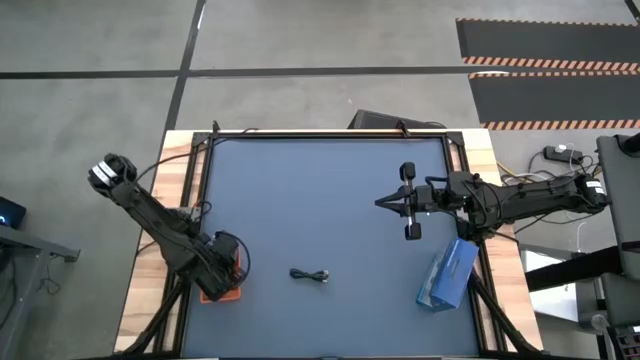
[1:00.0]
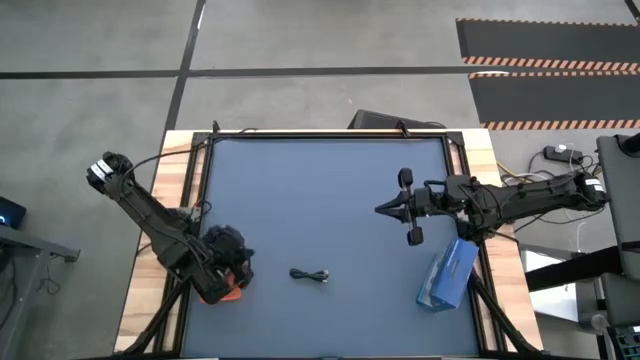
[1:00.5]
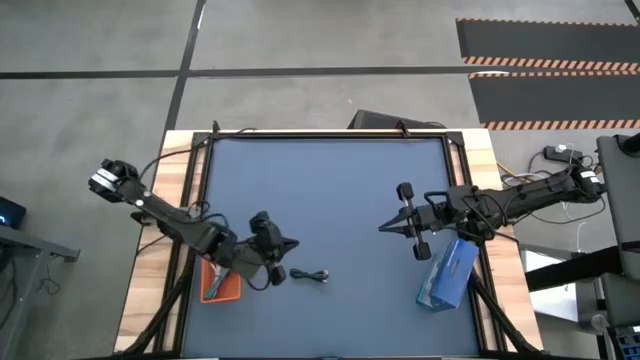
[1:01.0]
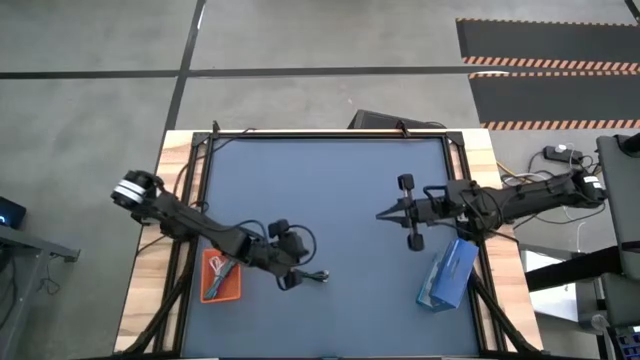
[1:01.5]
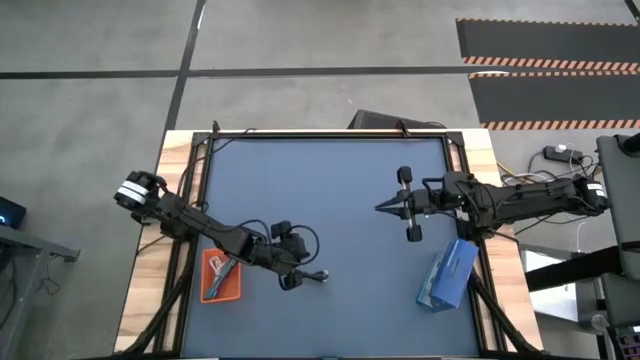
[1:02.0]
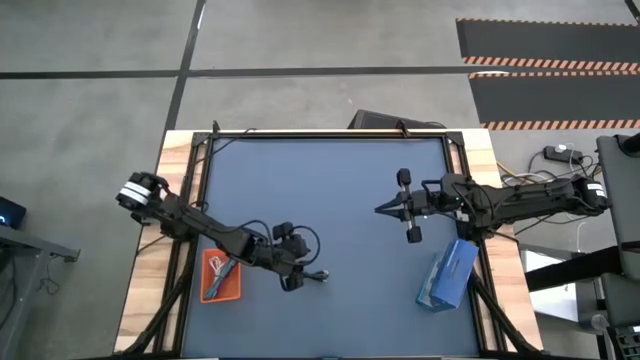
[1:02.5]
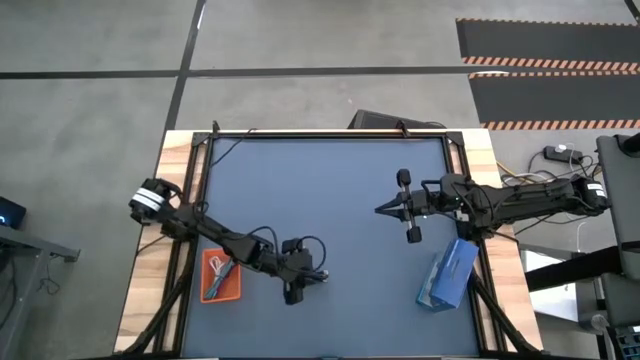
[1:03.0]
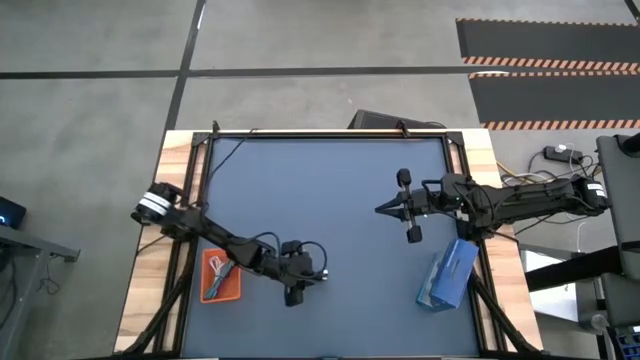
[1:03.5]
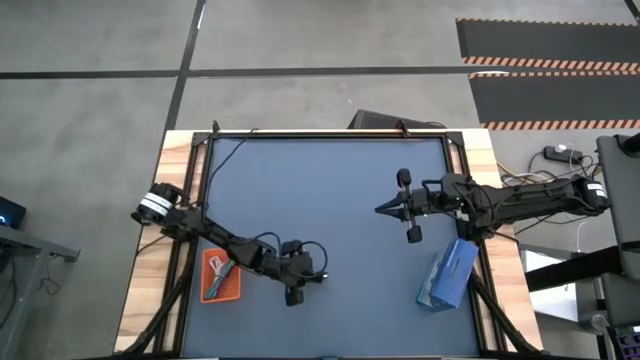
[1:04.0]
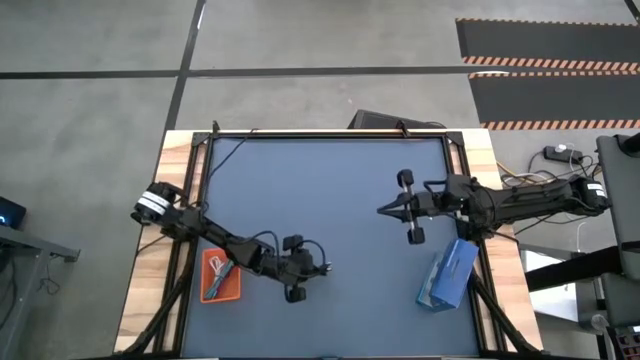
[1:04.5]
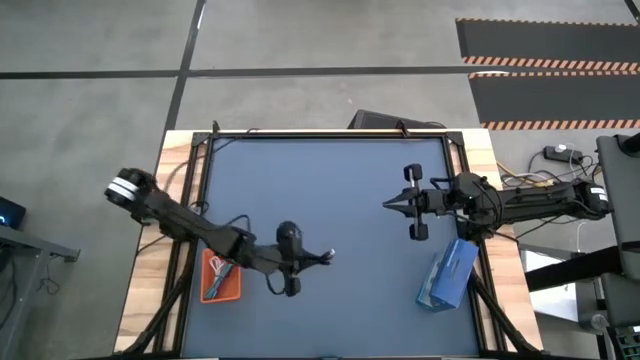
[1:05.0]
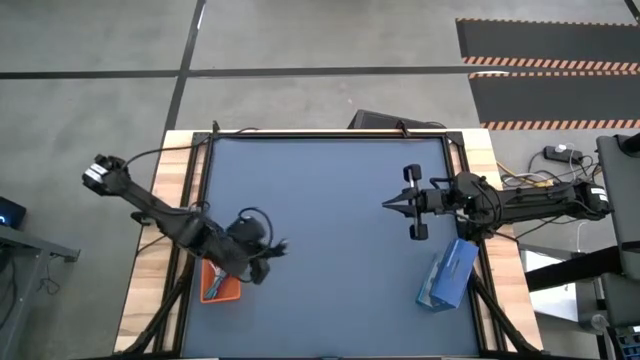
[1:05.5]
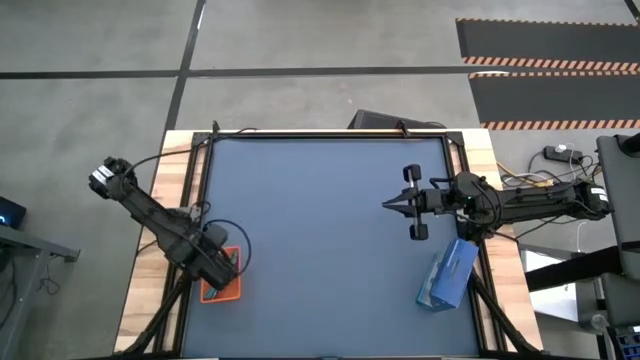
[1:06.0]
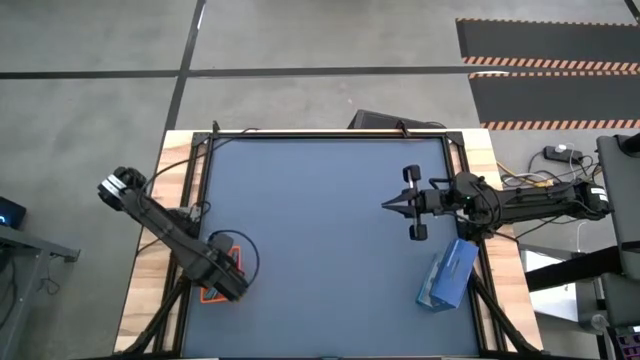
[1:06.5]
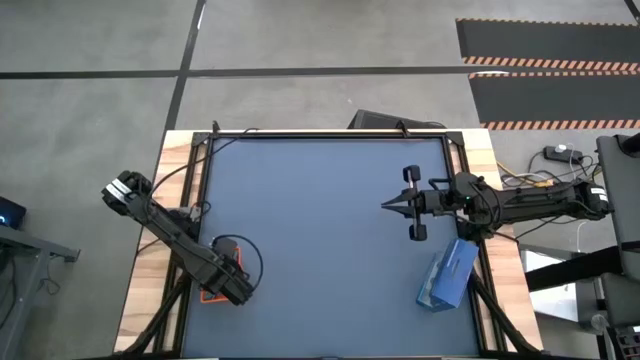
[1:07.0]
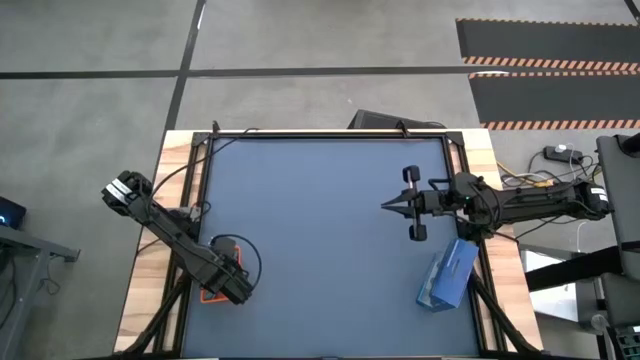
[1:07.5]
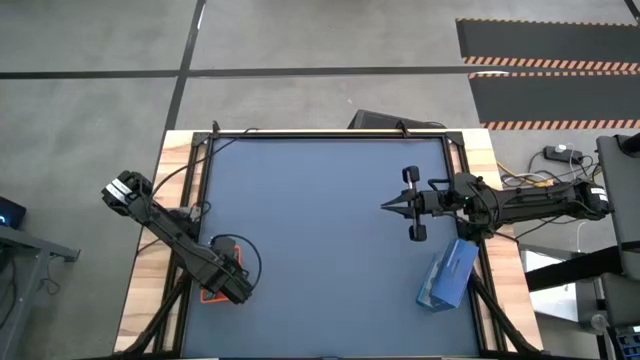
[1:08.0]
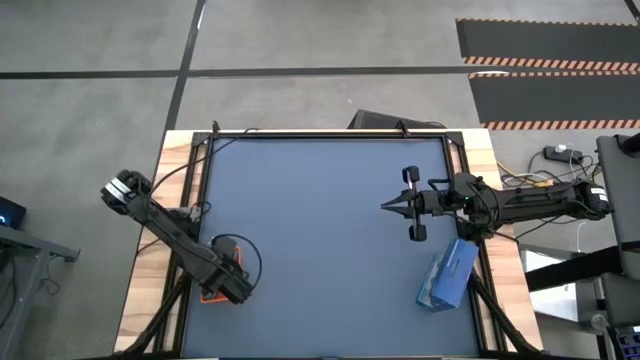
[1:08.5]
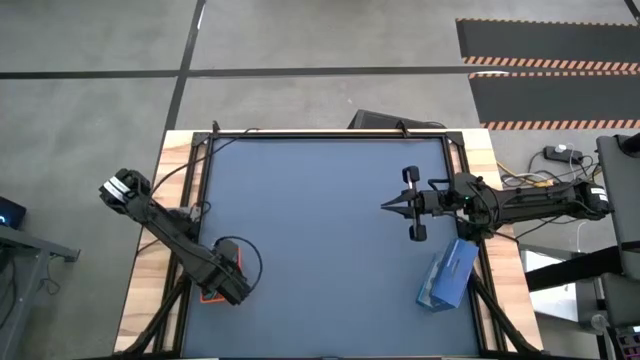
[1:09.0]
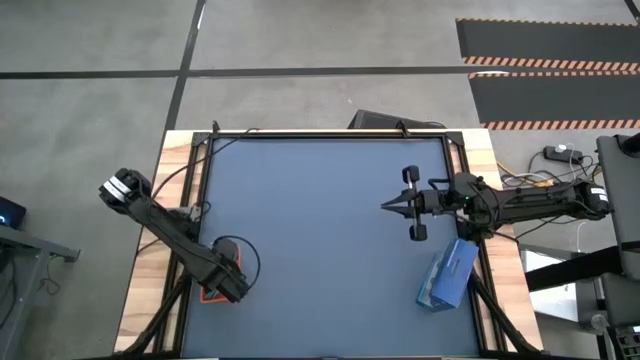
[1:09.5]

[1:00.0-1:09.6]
Task: Pick and place USB-C Cables
Put the black charger cable into the orange bin

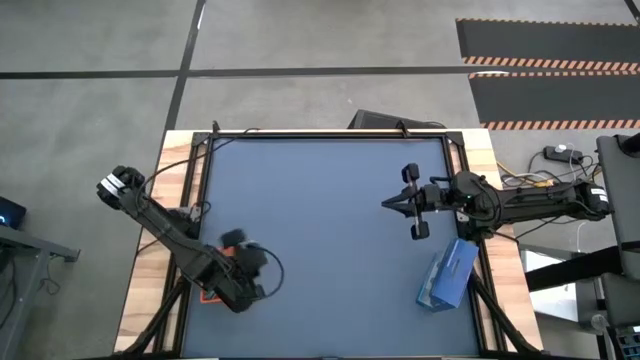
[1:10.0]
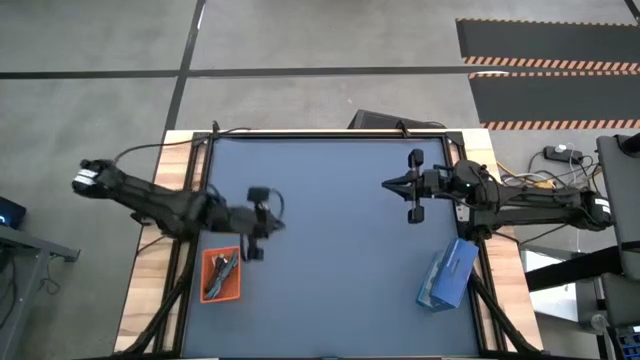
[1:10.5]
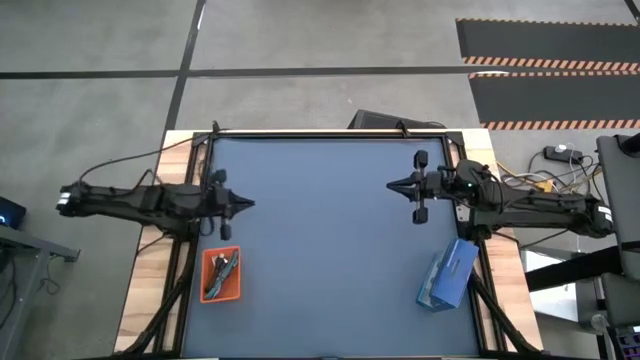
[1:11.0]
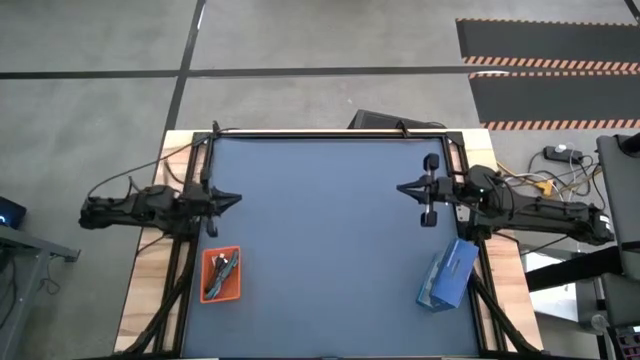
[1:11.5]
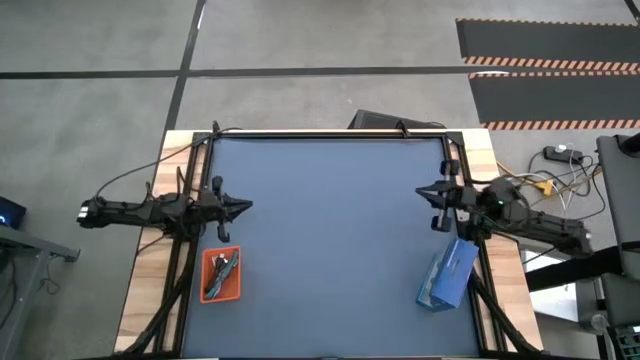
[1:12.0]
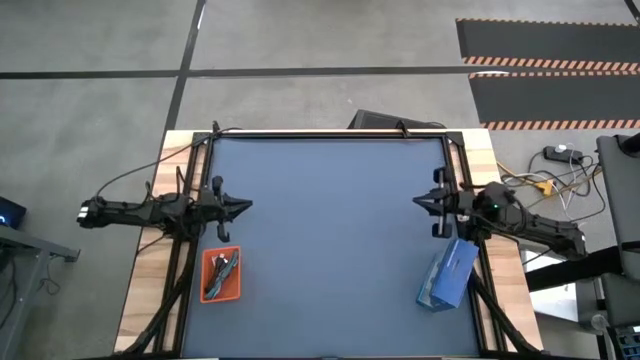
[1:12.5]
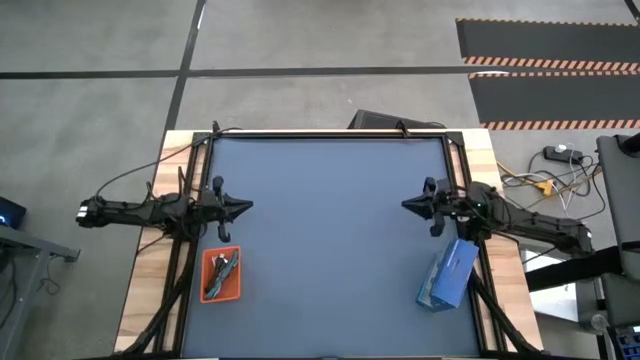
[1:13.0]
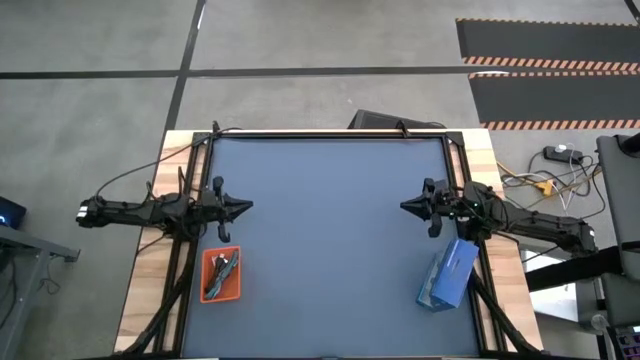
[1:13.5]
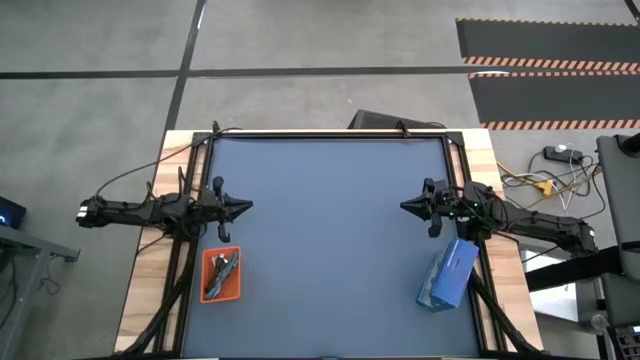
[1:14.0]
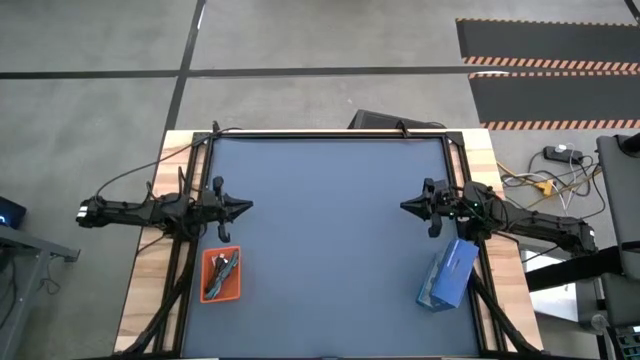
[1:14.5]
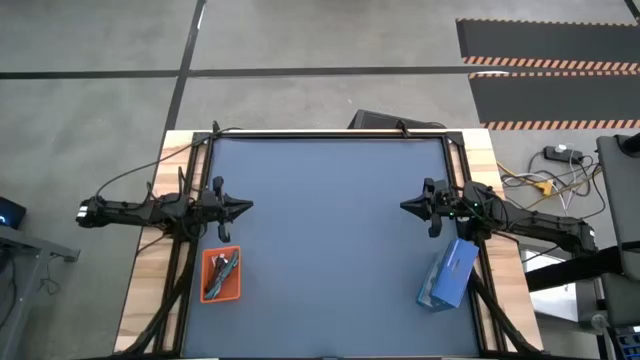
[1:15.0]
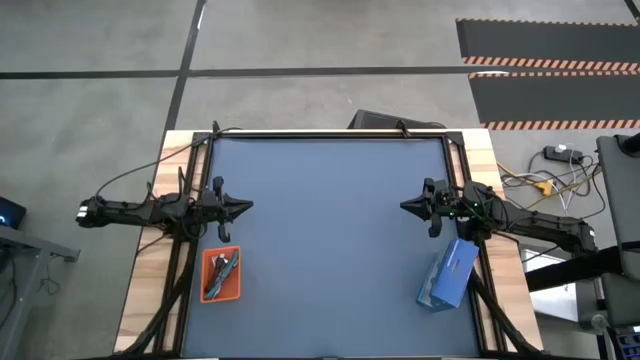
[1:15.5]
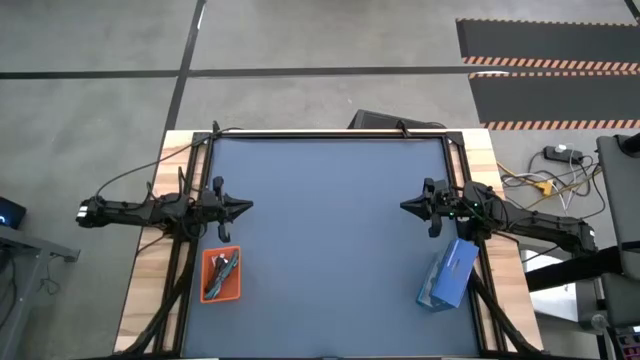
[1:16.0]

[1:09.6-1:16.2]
Return to Home Position

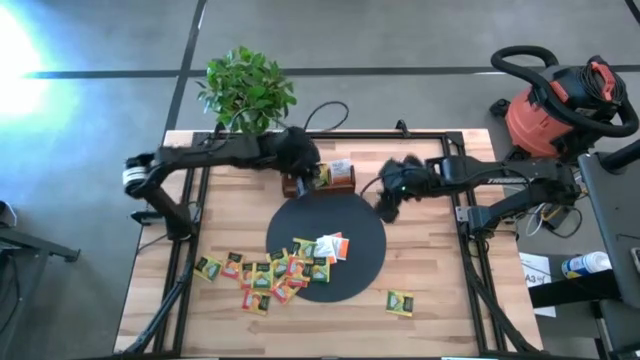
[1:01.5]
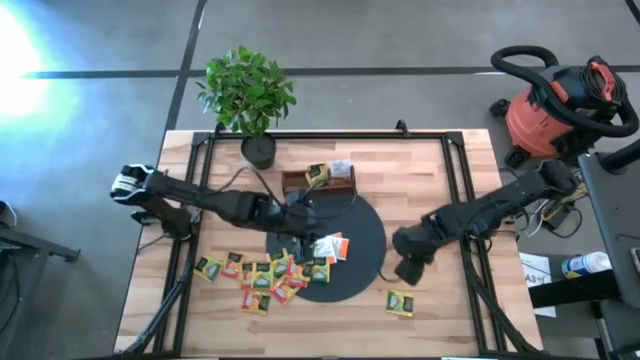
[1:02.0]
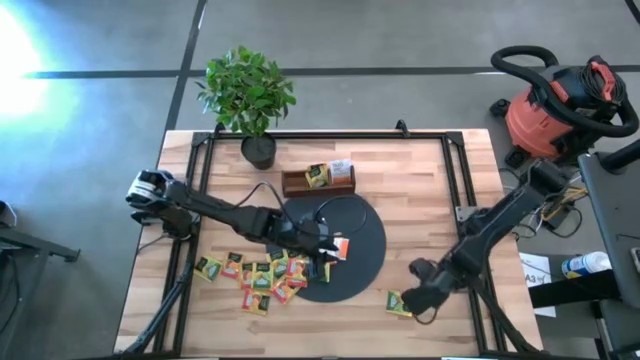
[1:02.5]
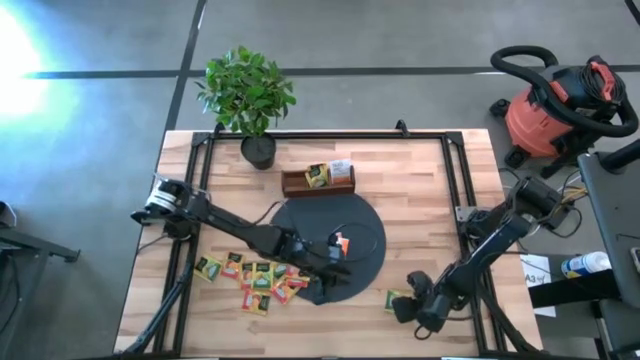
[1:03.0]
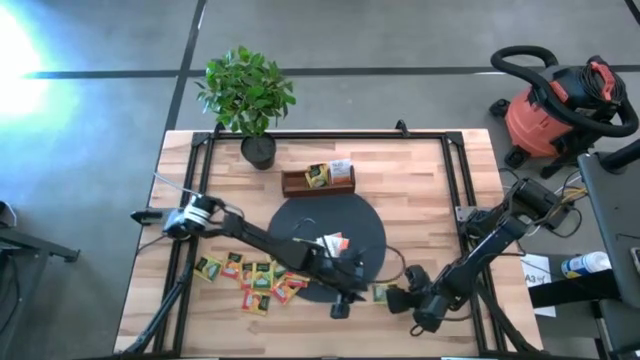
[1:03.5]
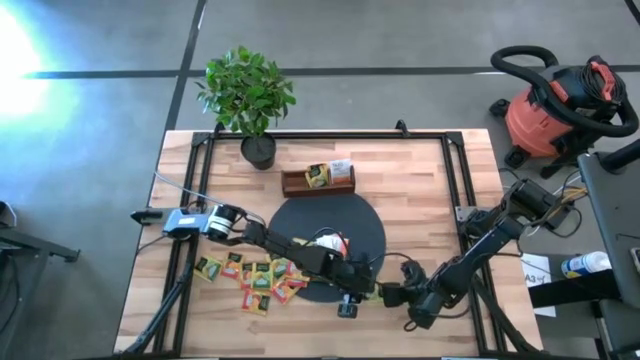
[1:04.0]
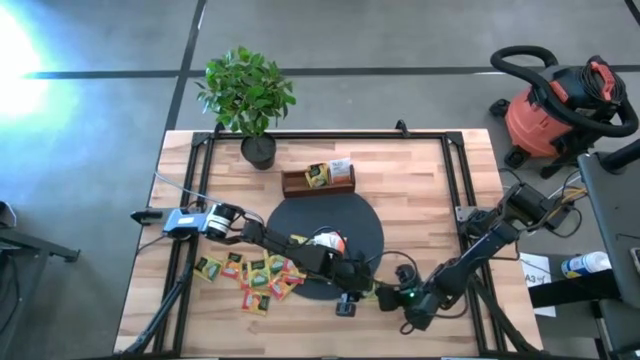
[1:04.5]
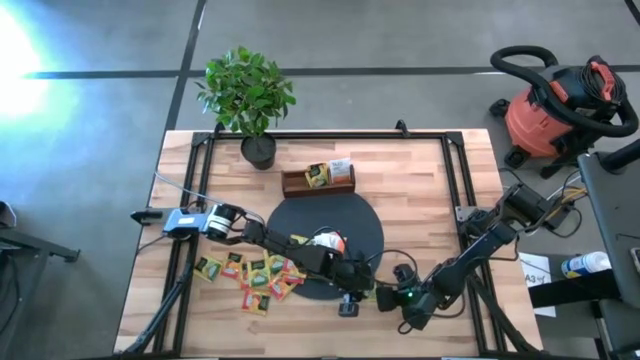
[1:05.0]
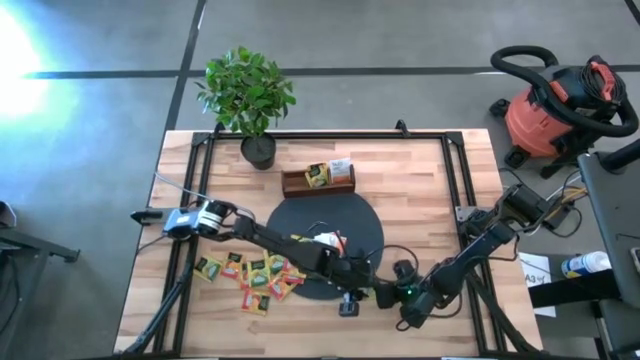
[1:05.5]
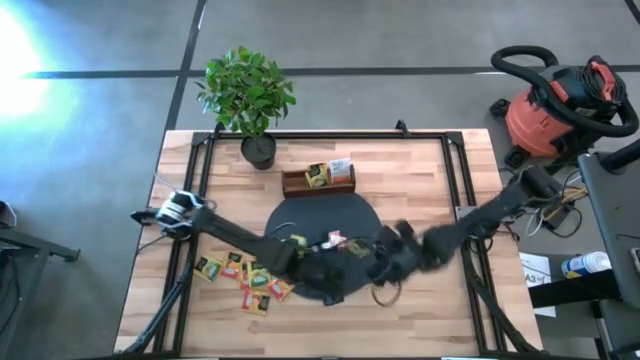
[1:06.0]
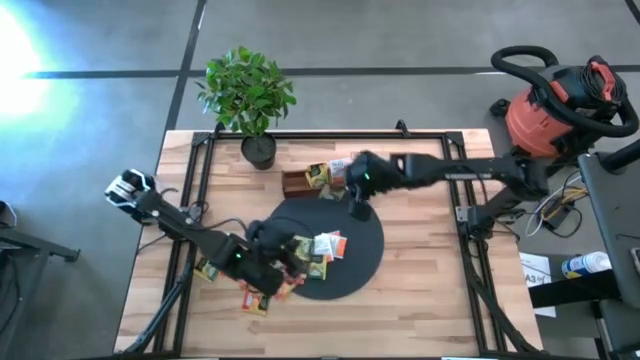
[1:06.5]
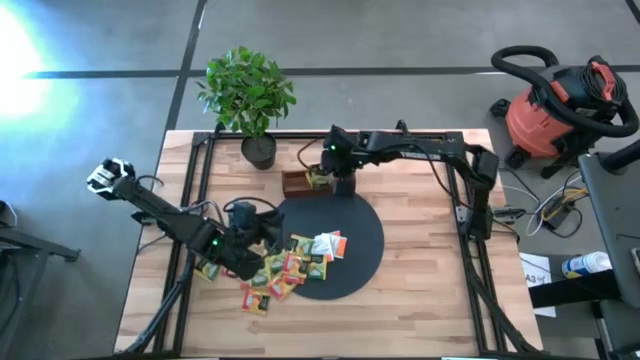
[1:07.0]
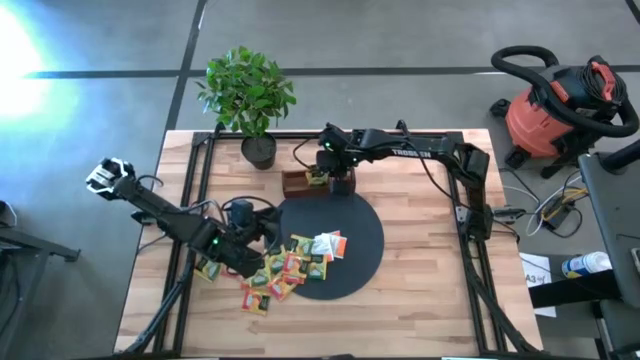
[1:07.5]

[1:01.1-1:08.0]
Task: Pick & Place Tea
Put the yellow tea bag into the middle slot of the wooden organizer
